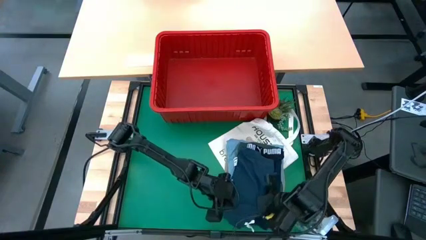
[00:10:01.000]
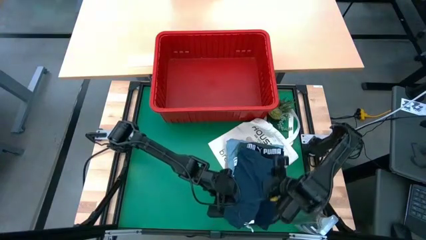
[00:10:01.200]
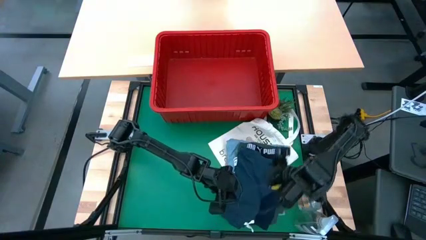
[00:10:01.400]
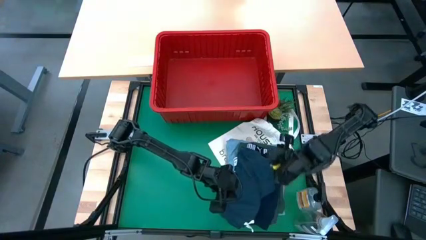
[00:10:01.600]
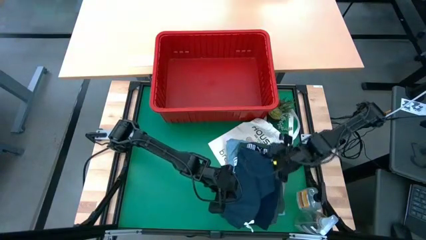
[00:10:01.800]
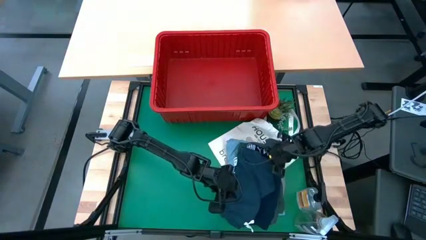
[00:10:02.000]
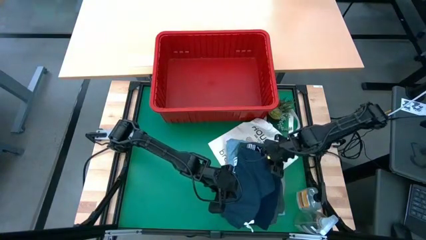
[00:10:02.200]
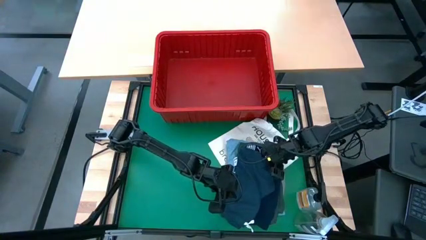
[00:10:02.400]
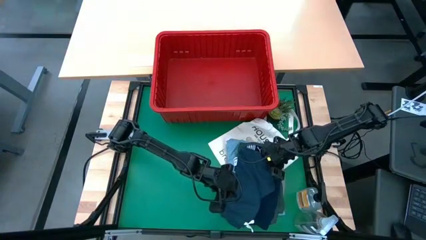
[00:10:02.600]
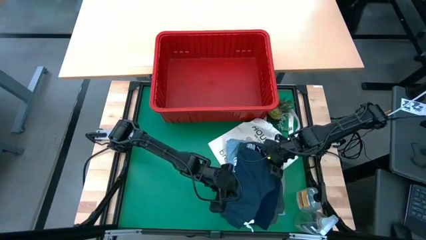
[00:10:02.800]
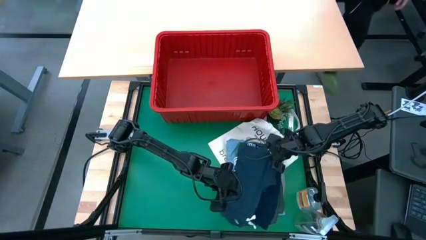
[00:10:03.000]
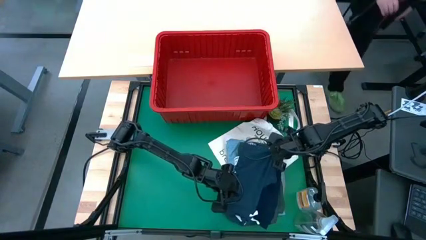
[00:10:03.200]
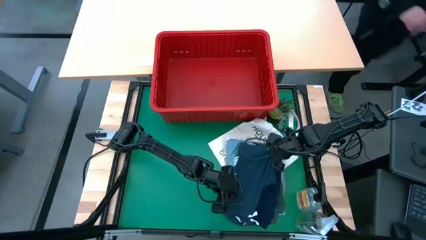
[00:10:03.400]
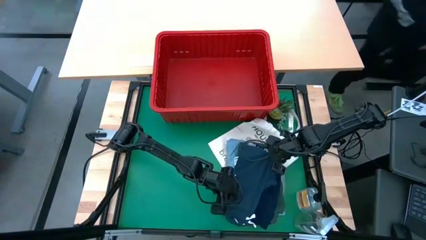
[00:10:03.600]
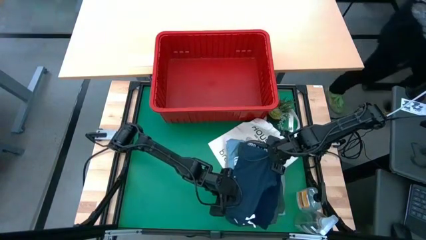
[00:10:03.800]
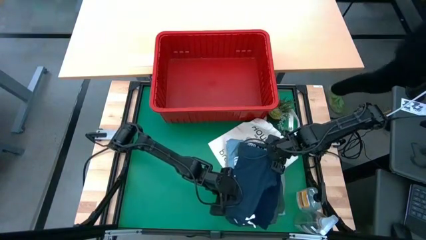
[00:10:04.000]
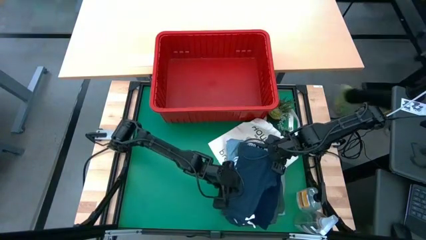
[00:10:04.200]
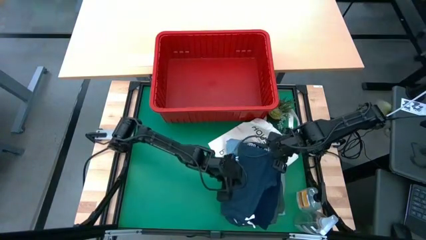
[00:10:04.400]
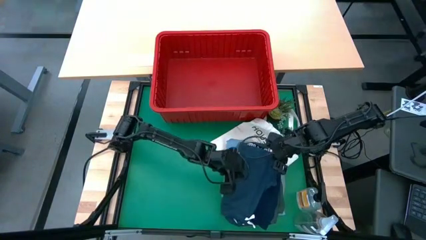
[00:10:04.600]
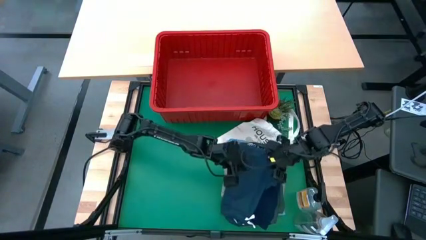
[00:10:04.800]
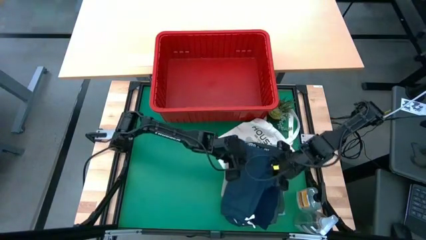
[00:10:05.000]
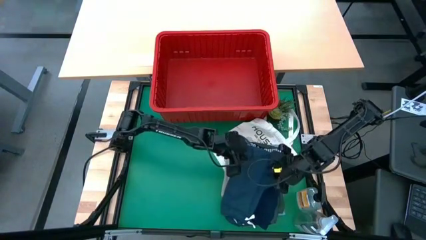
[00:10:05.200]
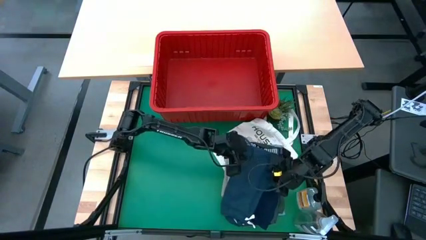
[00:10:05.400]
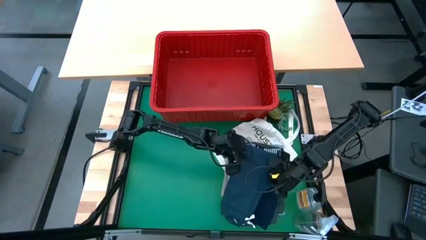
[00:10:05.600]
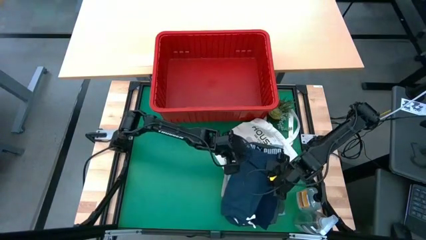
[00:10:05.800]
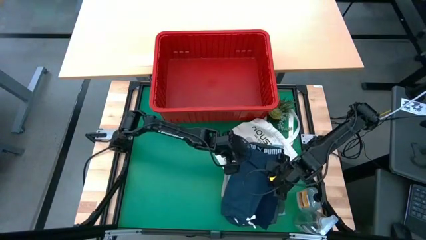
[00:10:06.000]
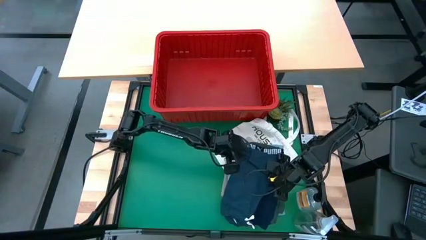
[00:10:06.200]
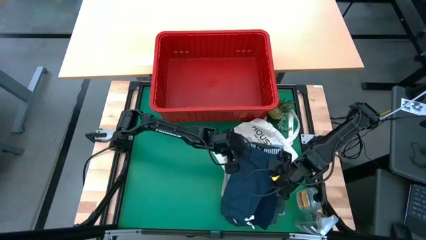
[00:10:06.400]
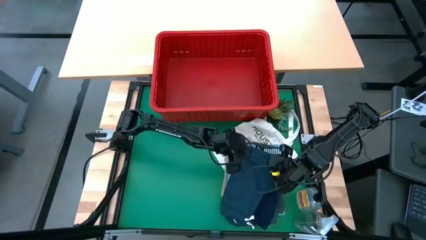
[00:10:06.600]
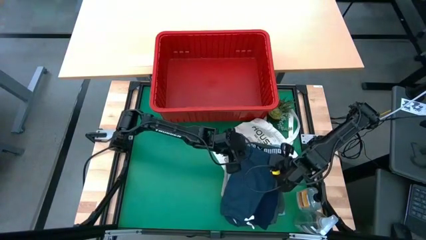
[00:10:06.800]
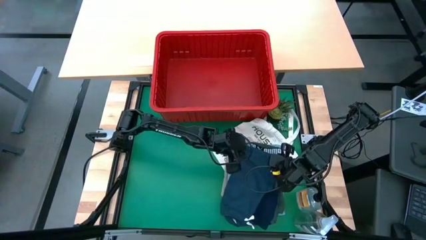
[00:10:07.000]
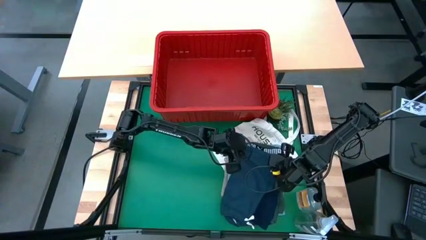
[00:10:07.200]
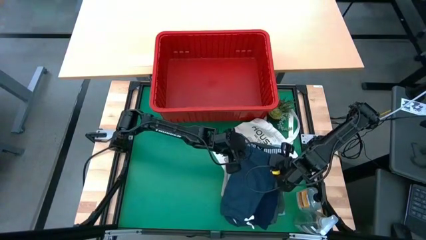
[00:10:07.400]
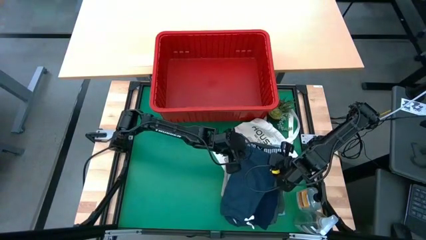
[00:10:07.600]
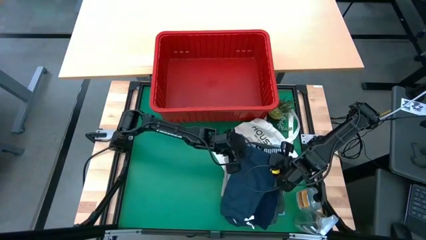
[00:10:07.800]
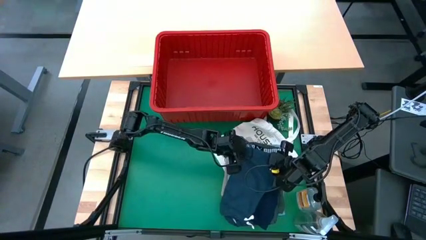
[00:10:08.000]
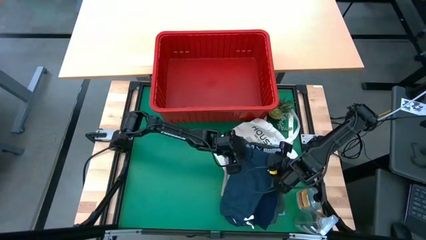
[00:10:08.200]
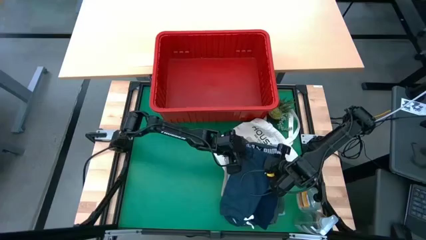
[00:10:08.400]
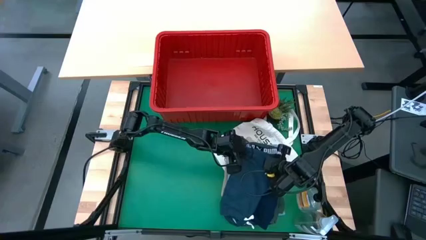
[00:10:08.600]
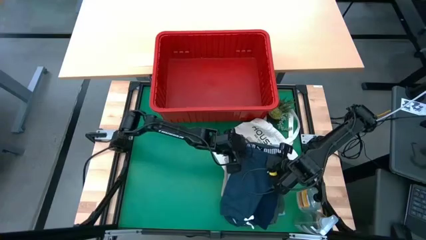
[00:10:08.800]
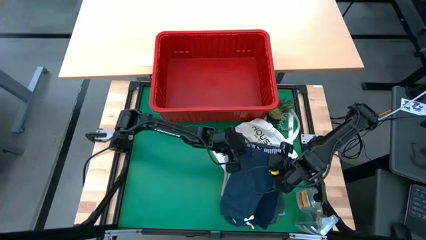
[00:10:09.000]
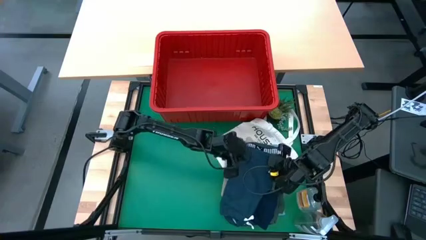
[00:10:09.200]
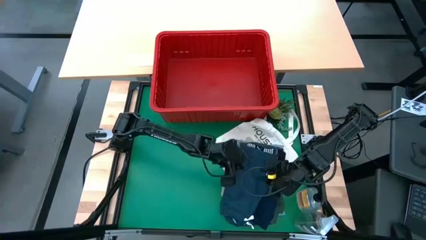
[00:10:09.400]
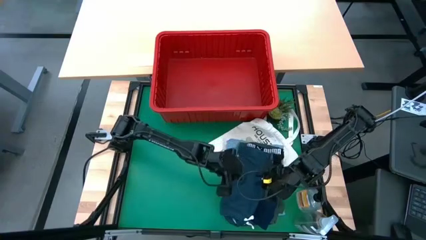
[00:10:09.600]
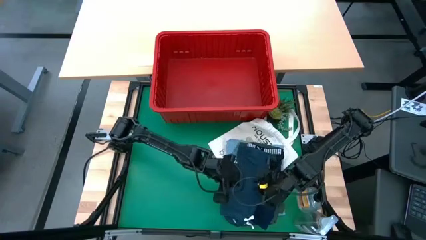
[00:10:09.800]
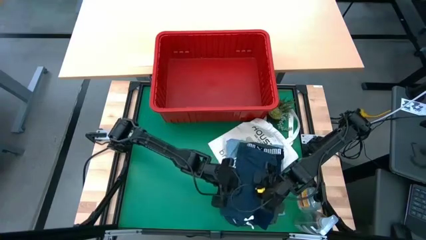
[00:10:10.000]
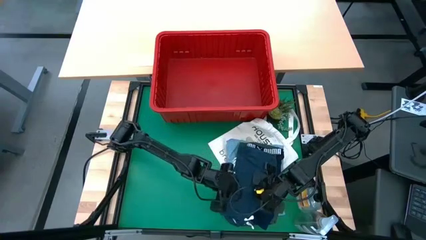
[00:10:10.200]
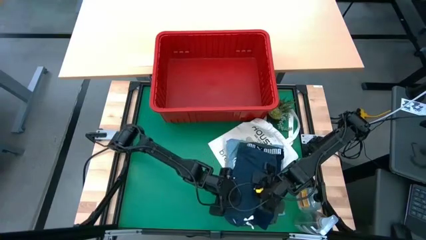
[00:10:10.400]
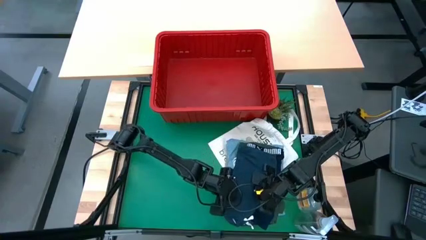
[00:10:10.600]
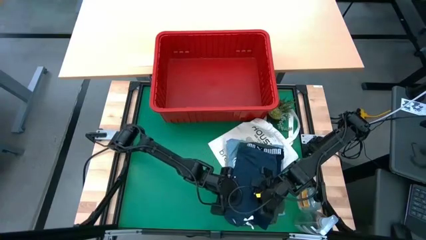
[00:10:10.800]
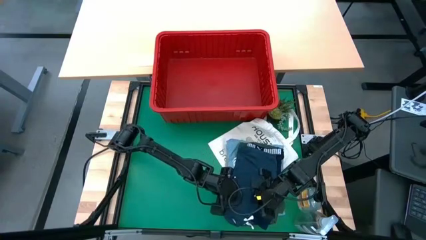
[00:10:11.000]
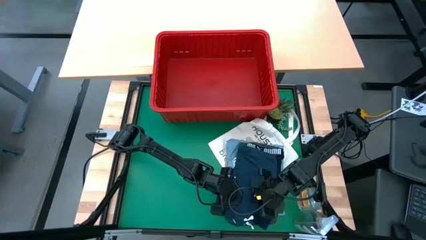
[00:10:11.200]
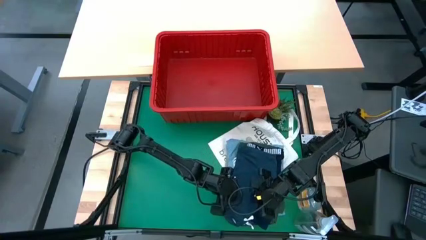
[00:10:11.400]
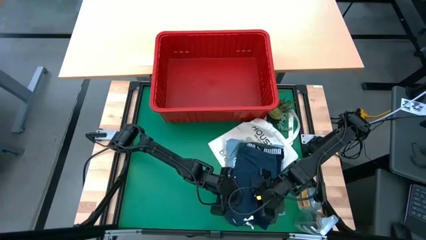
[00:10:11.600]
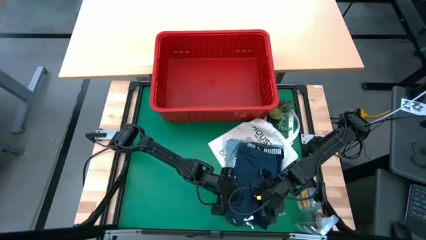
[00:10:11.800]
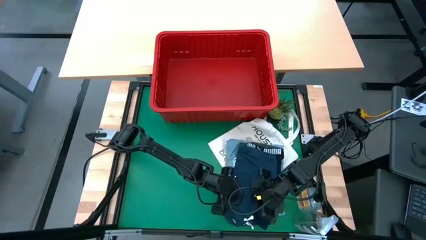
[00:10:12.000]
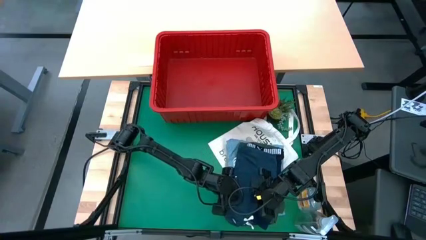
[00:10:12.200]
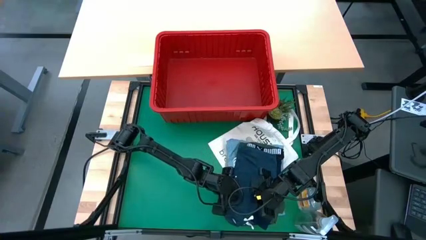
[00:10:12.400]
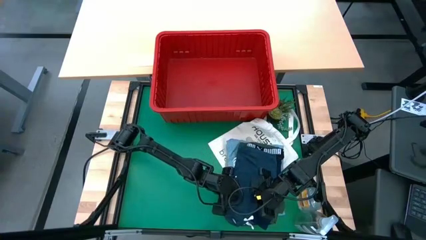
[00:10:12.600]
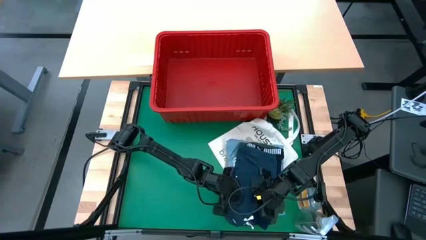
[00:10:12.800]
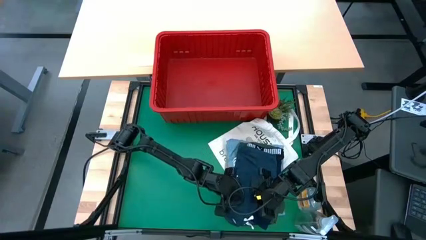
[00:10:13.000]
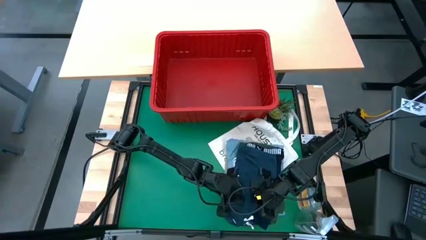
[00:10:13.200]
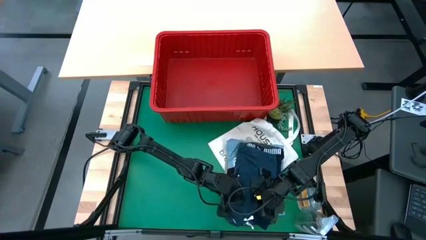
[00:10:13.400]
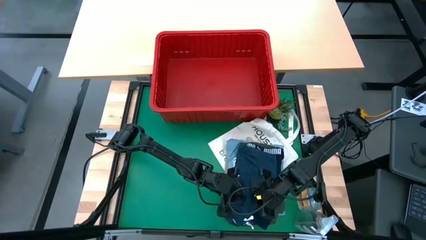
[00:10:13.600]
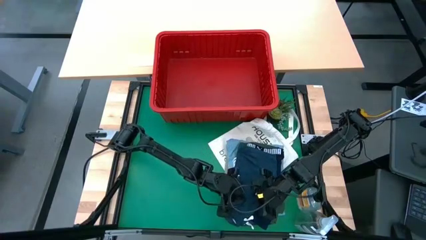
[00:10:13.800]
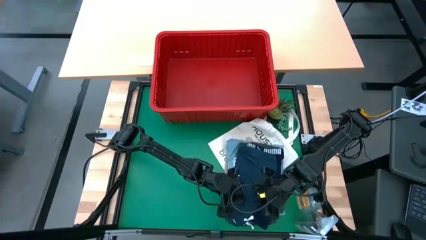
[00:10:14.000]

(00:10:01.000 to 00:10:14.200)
Task: Fold Laundry from Bin
Stack the dark gray shorts on top of the dark blue boxer

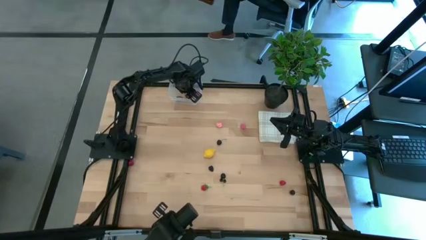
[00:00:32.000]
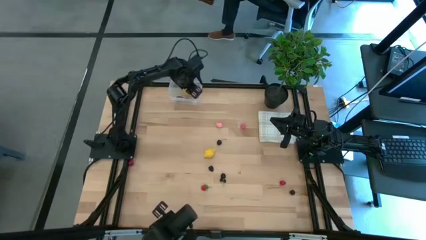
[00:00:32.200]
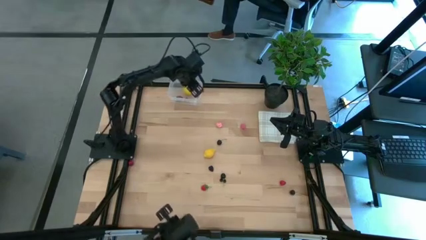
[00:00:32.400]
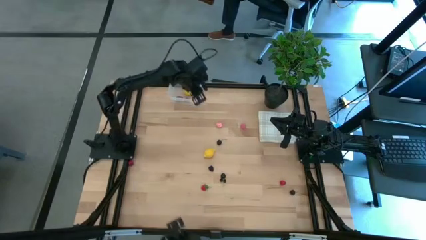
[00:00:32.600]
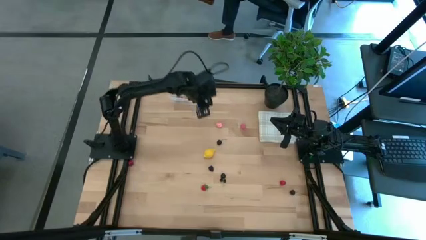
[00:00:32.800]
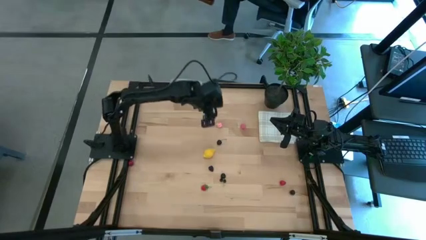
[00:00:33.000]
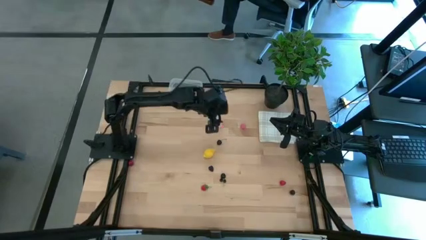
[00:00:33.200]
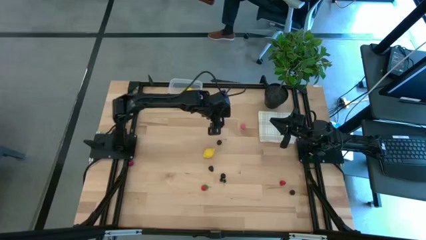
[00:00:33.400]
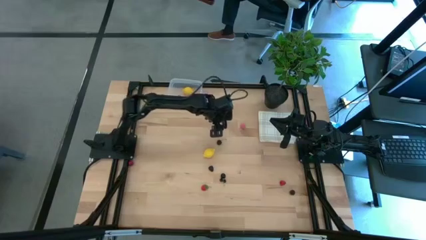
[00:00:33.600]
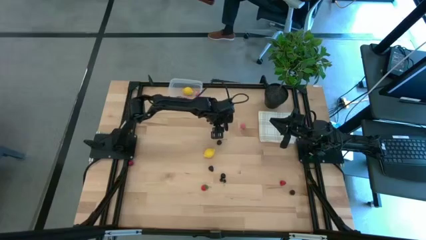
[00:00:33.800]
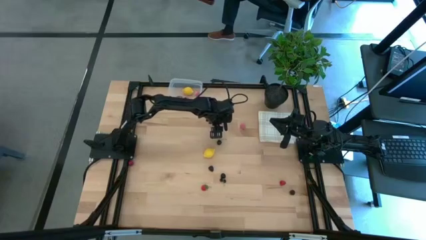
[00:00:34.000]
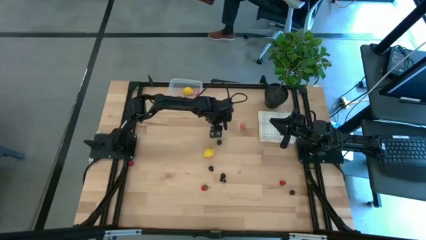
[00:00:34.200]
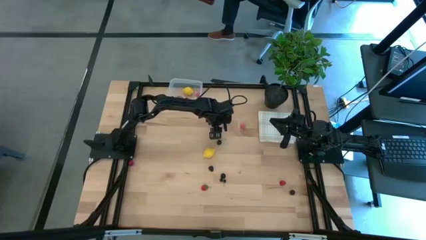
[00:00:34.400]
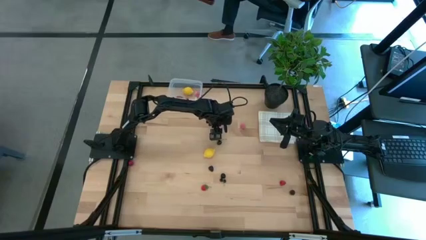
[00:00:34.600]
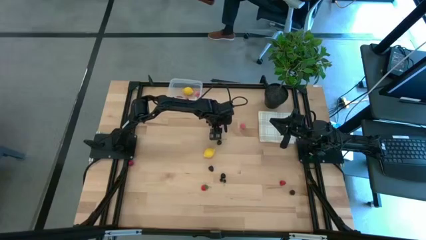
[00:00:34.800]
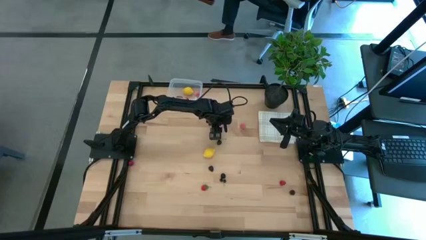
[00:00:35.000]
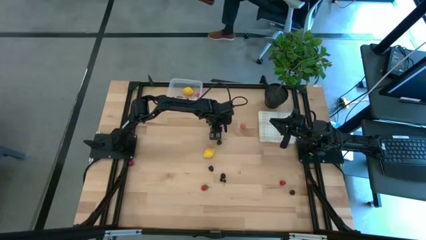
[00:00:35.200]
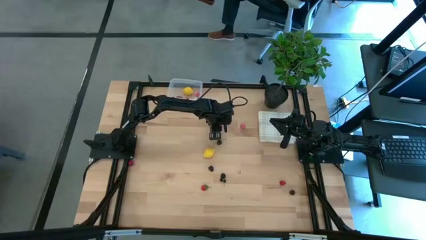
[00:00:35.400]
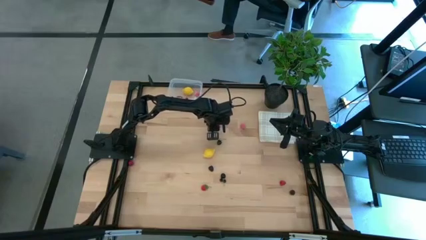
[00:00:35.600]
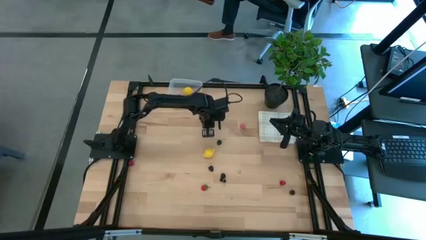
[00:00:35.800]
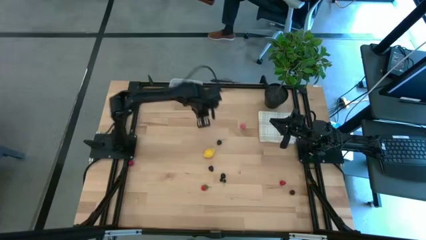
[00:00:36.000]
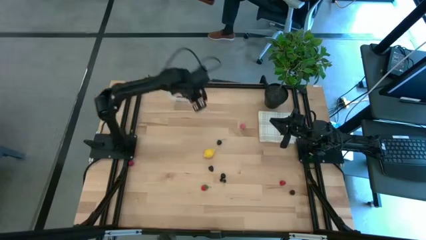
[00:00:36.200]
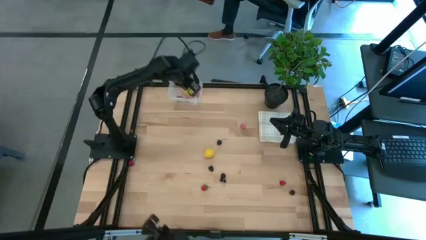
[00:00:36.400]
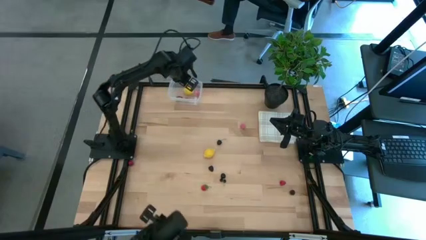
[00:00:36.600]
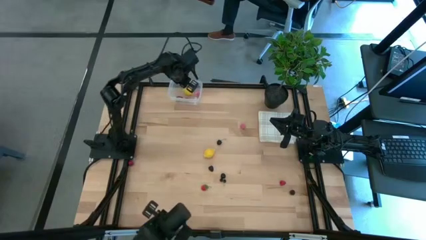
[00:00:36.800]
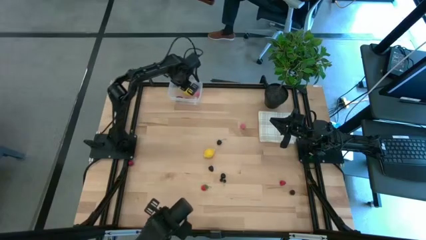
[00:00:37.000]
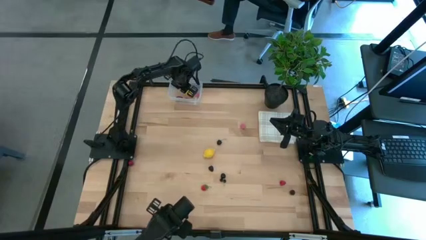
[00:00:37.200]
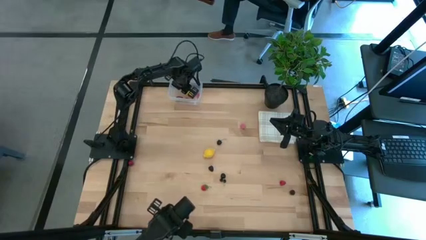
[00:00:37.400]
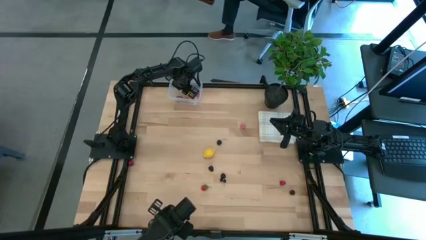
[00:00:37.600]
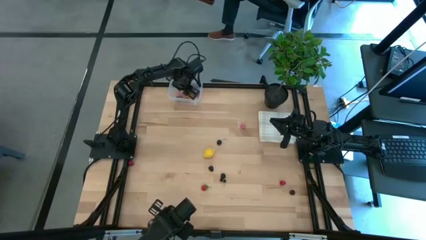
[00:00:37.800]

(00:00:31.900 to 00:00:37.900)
Task: Pick and placing Produce into tupperware
Put the left pink peach into the transparent bin
